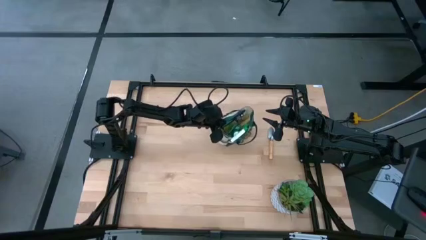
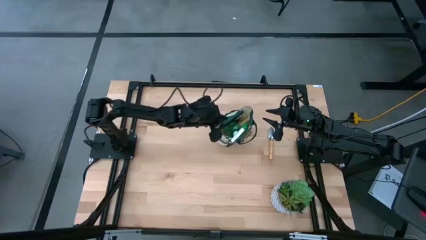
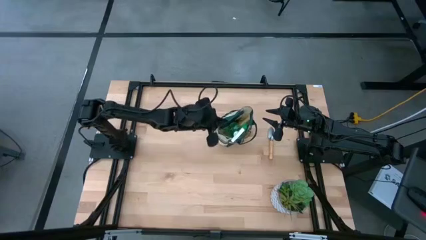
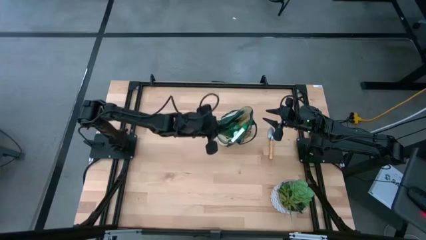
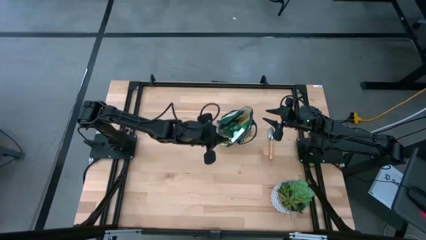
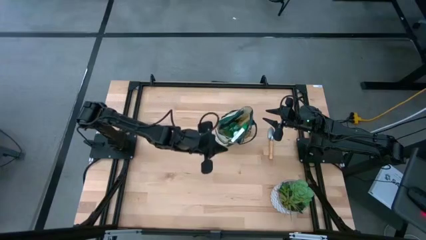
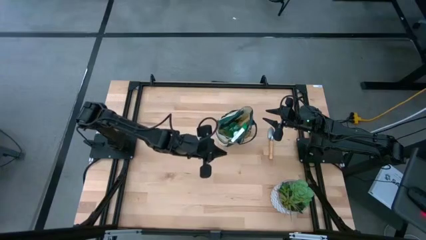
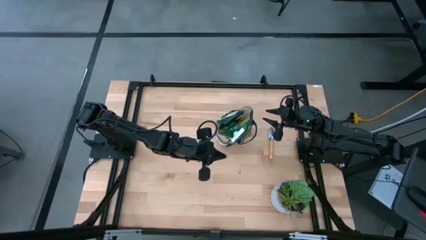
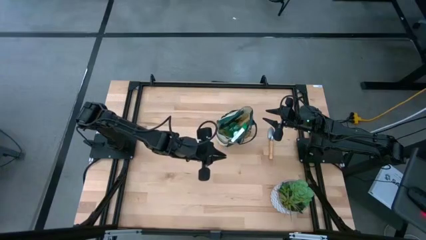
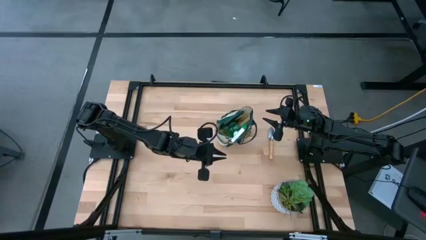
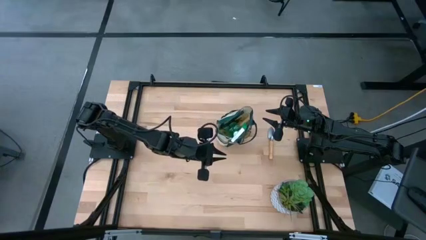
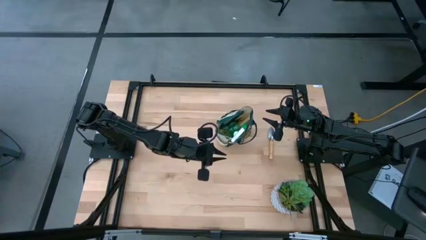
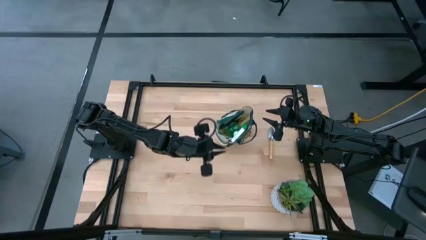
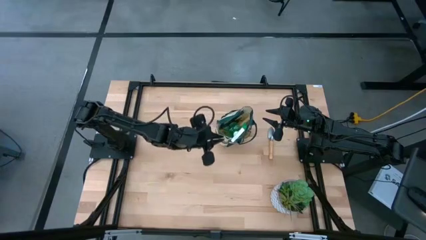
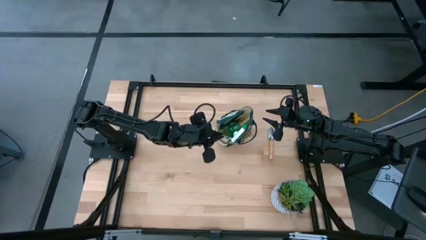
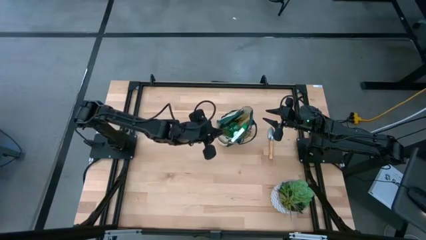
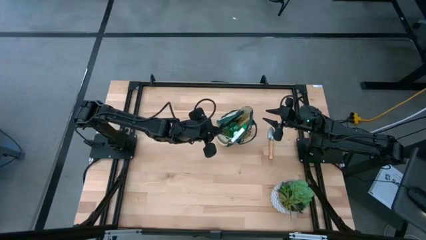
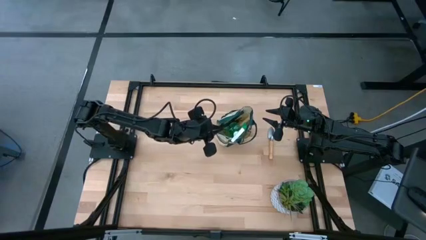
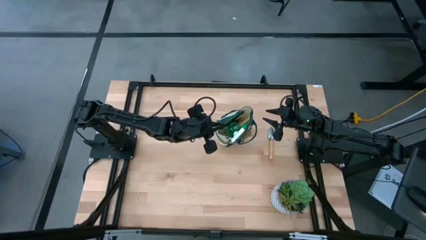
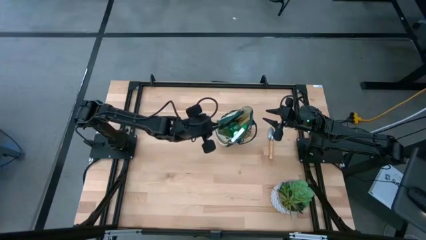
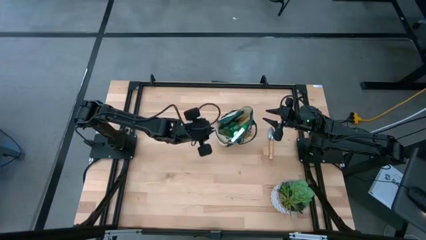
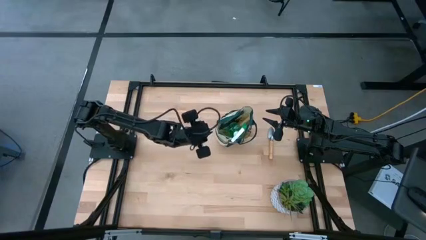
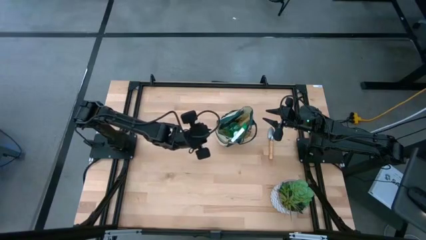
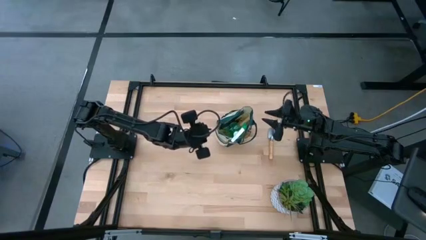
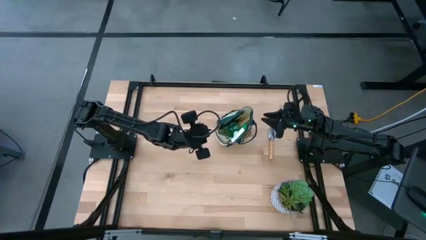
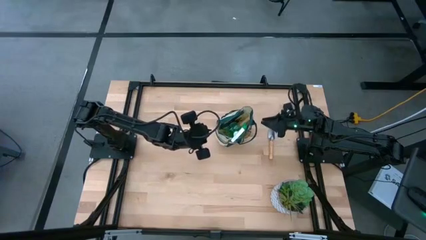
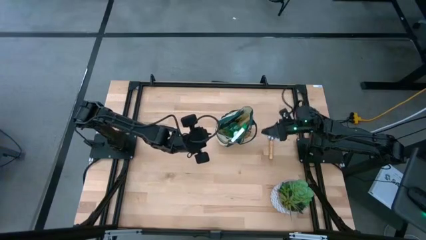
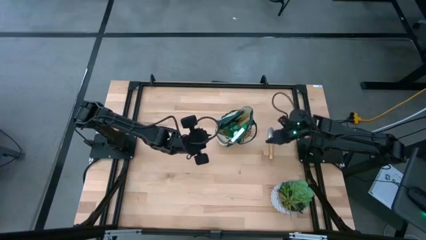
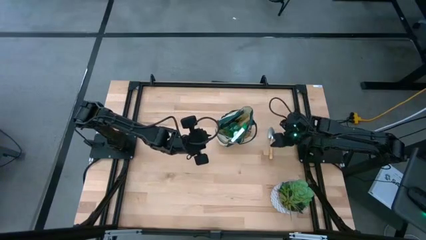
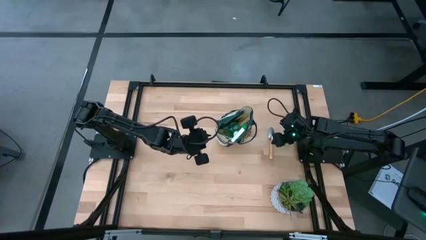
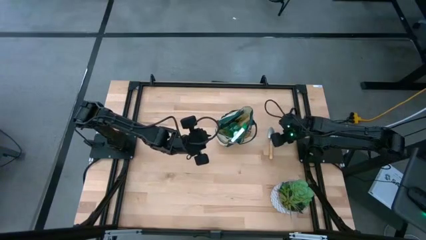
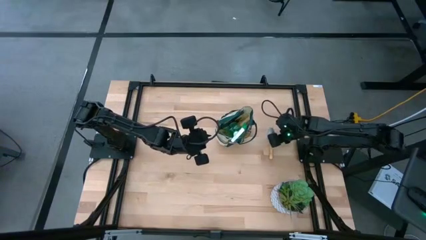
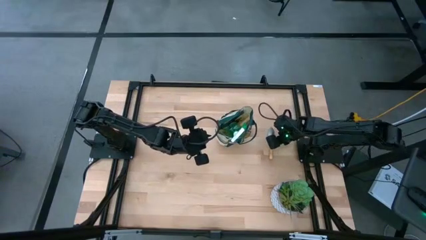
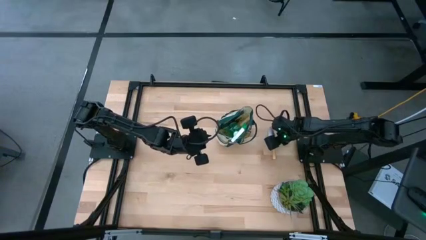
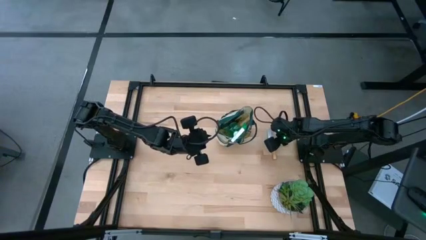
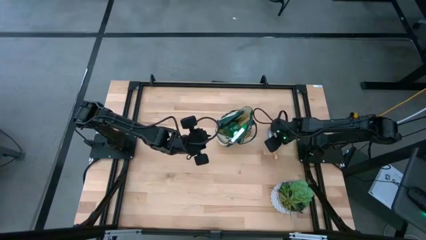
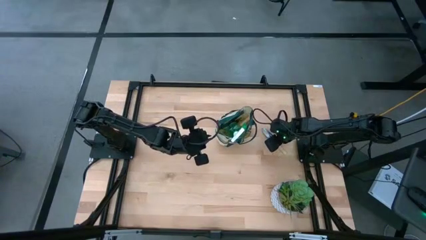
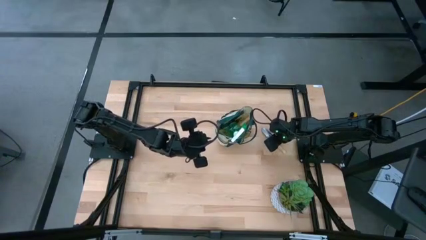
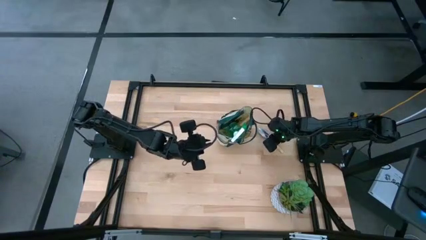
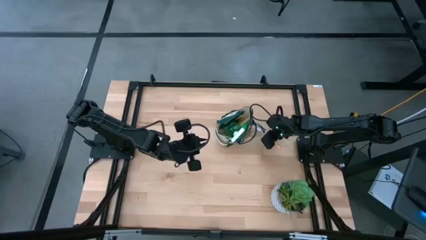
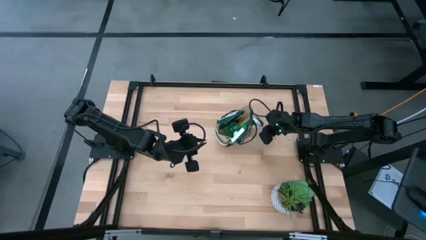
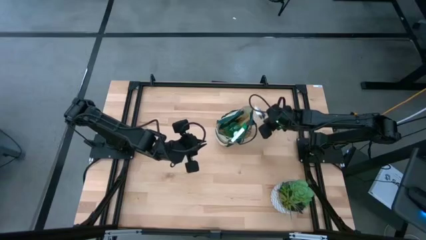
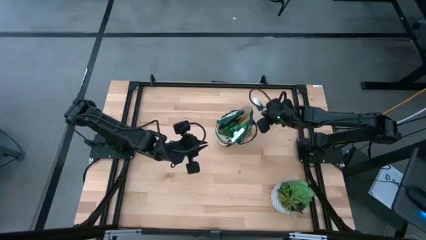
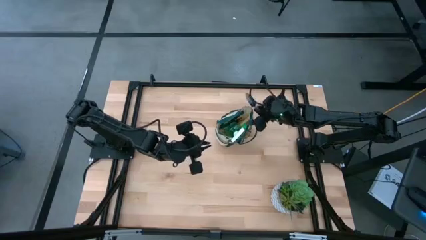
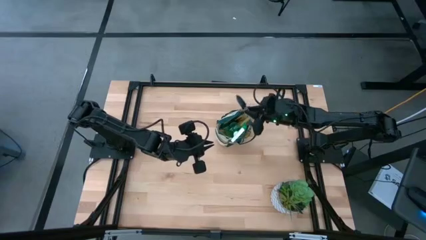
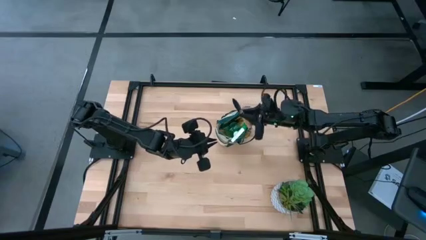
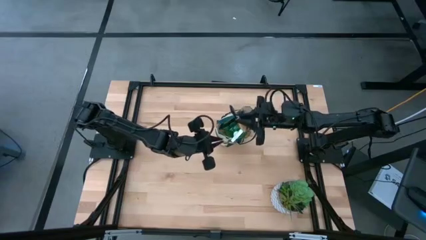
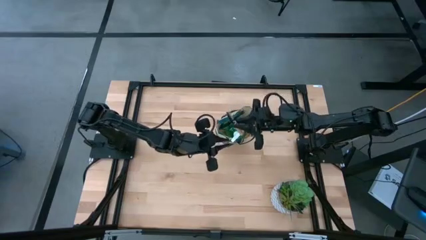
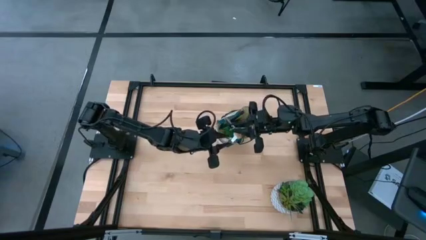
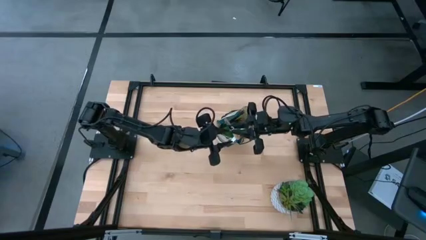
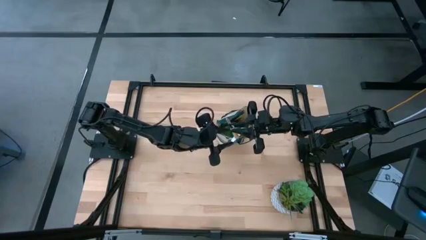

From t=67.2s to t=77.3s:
Task: Pick & Place Garden tools in Gardening bag
Put the brown trowel into the green gardening bag

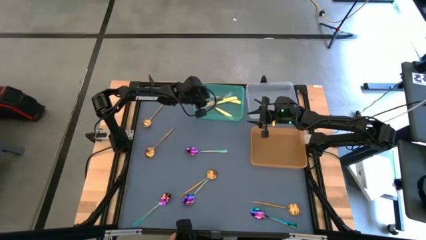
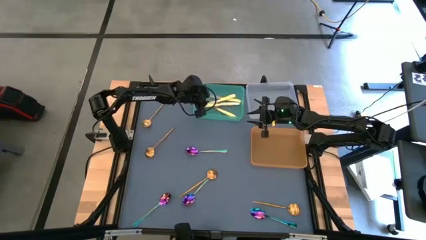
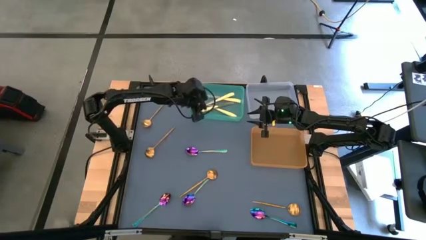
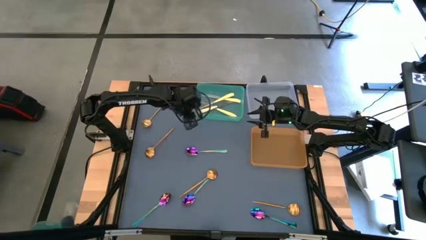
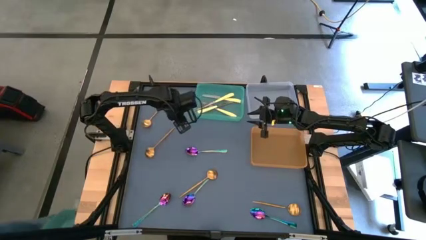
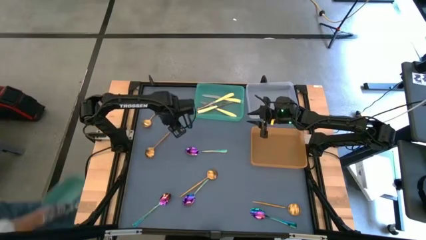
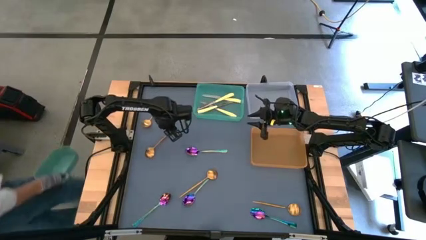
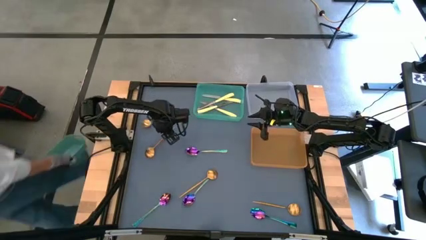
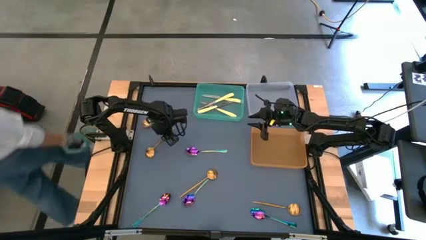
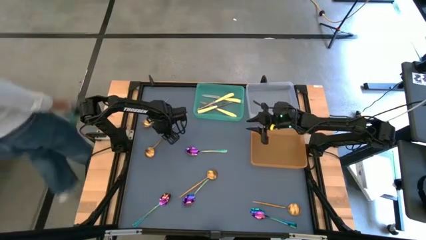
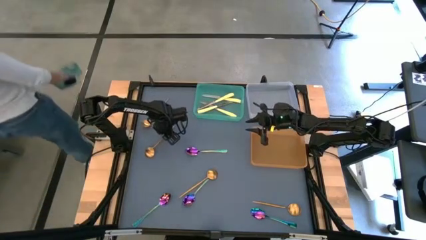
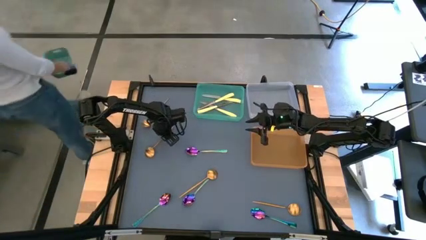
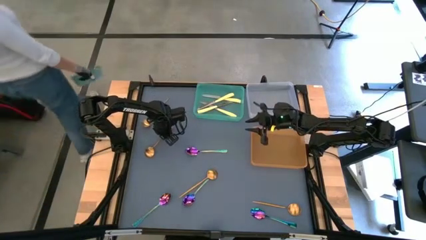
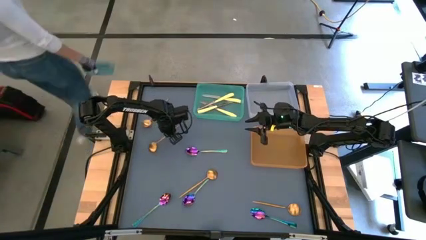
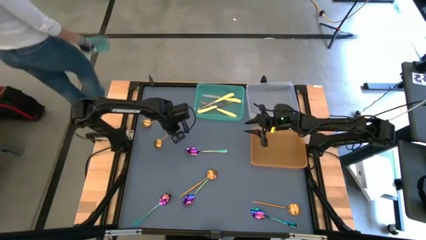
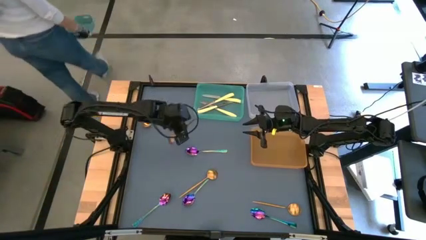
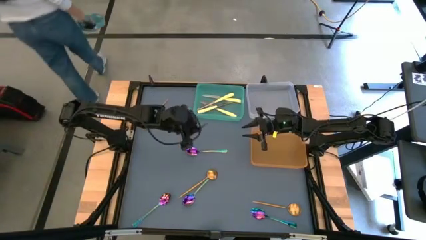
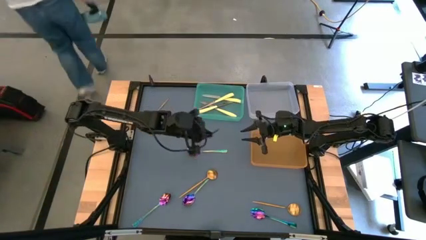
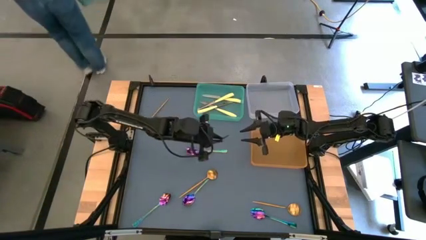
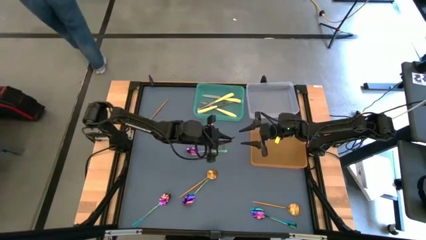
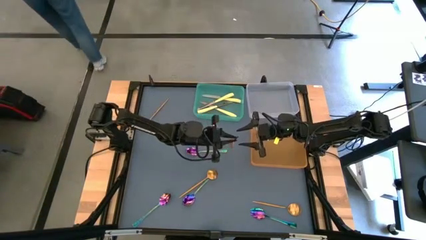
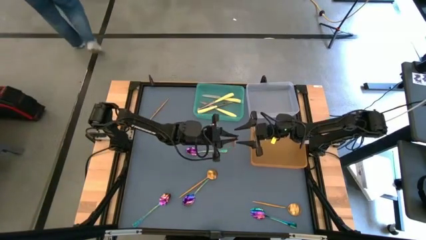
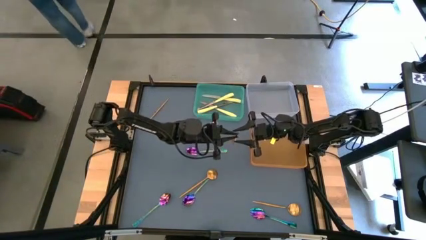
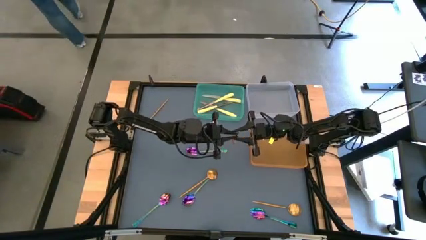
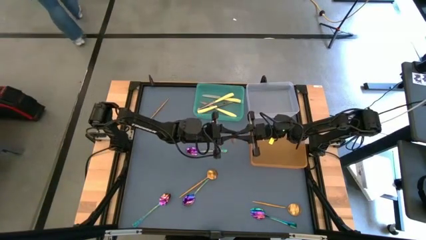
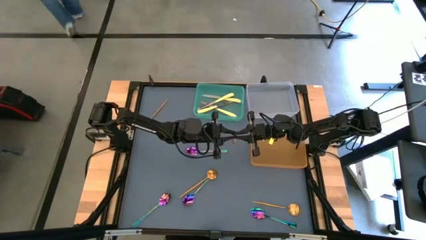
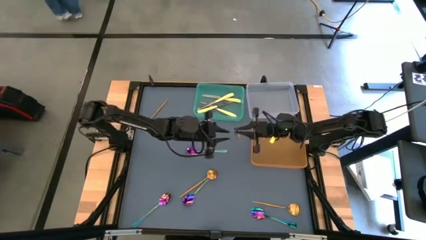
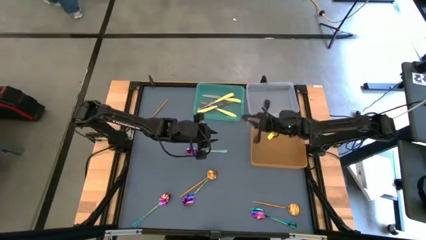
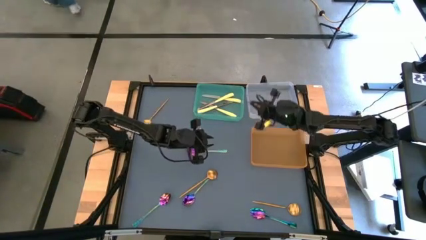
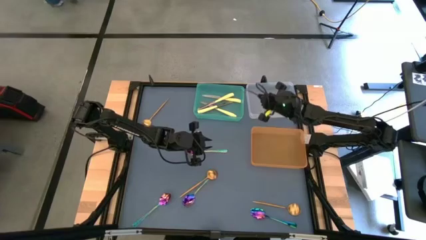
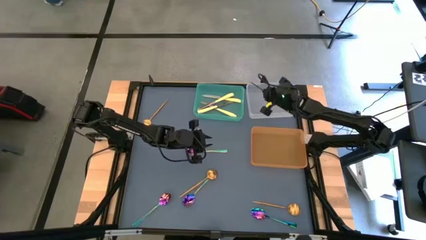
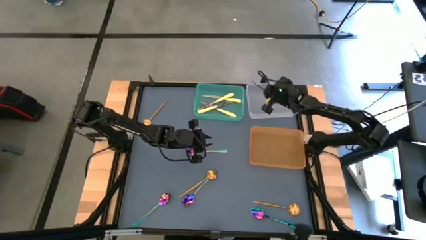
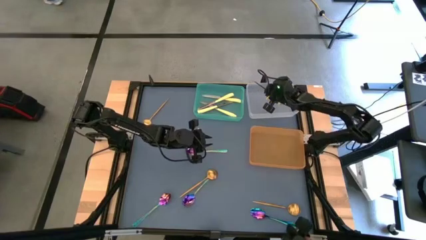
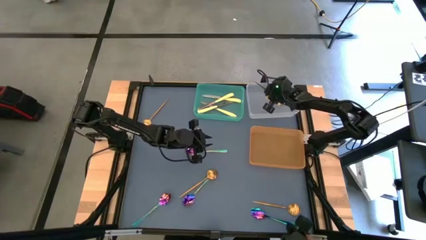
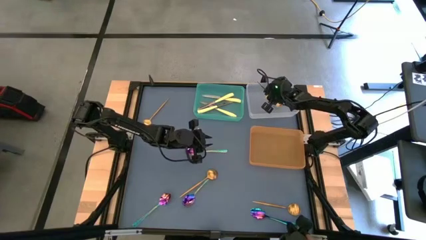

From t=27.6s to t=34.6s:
Task: Sort silverware by color (type)
Put the gold spoon into the transparent bin
